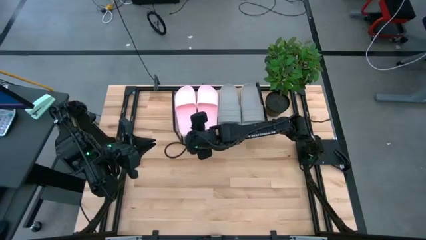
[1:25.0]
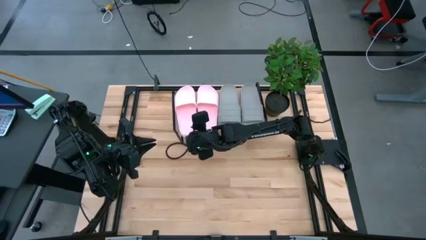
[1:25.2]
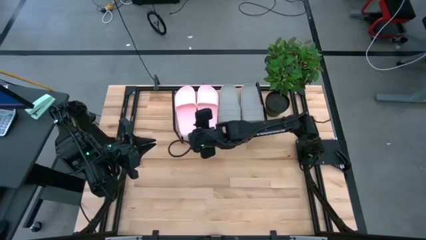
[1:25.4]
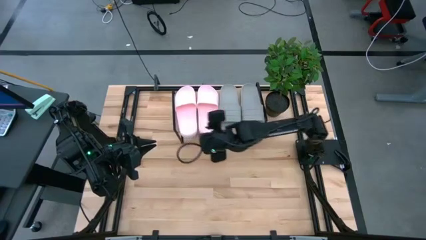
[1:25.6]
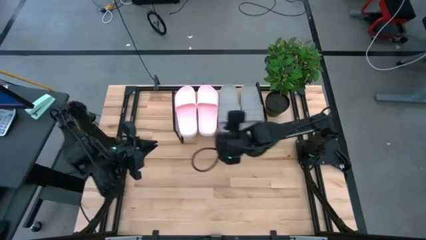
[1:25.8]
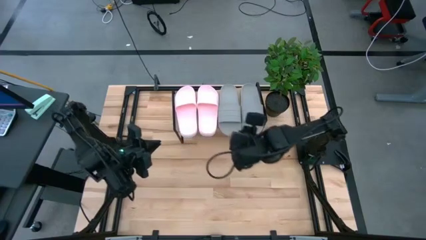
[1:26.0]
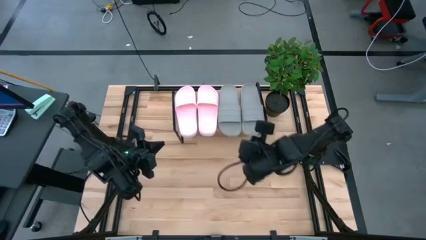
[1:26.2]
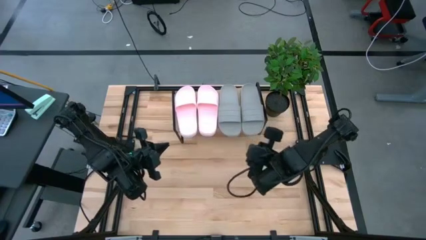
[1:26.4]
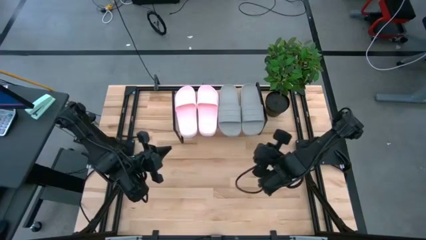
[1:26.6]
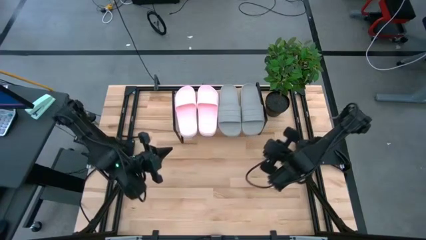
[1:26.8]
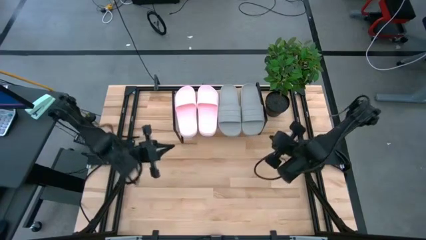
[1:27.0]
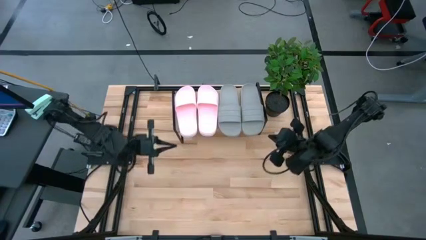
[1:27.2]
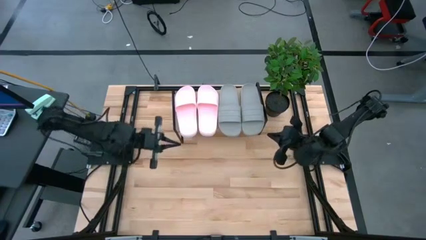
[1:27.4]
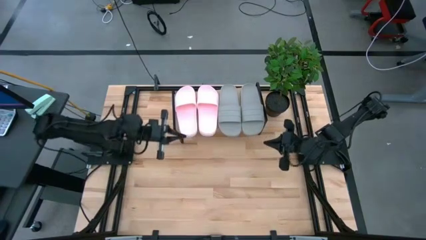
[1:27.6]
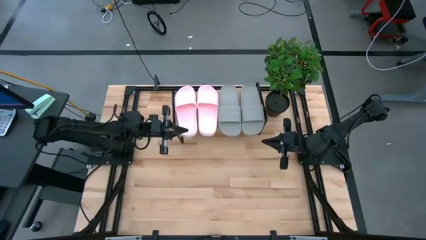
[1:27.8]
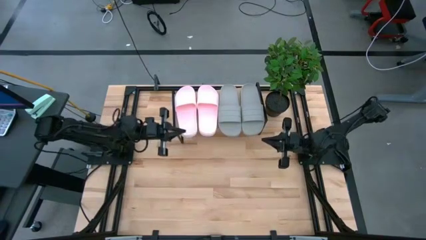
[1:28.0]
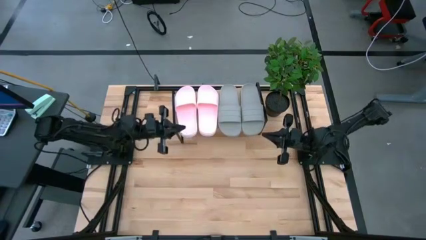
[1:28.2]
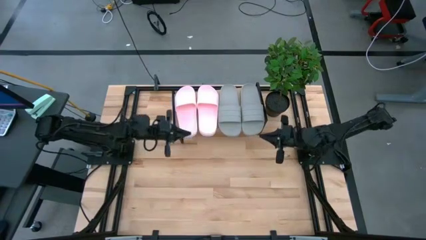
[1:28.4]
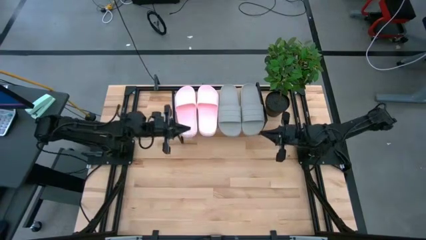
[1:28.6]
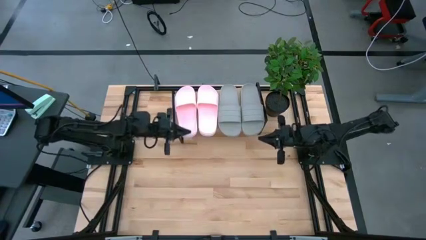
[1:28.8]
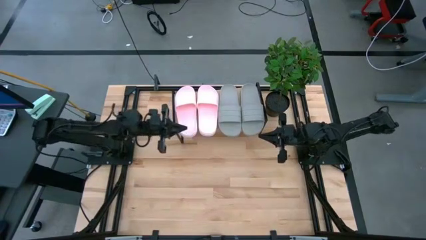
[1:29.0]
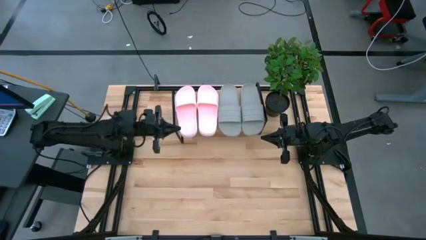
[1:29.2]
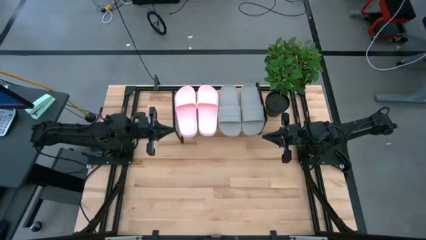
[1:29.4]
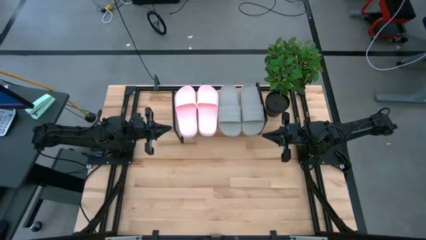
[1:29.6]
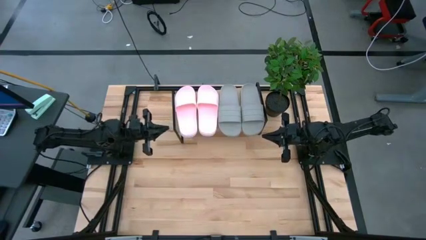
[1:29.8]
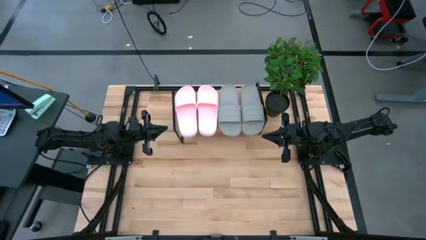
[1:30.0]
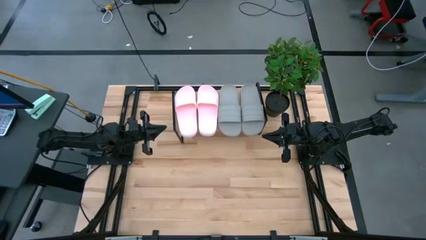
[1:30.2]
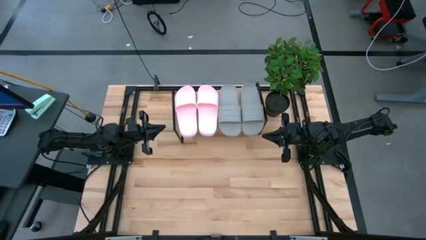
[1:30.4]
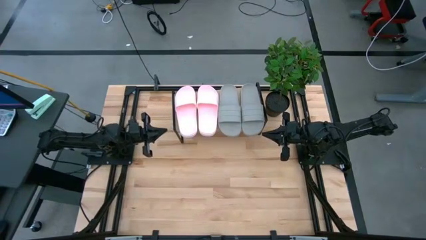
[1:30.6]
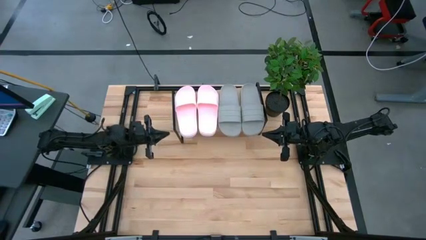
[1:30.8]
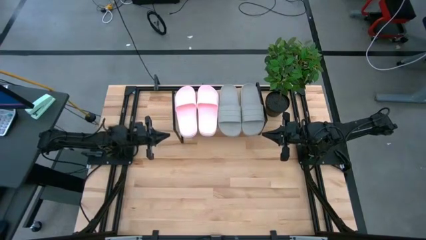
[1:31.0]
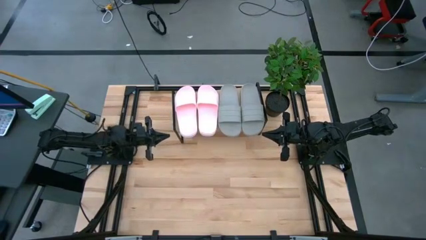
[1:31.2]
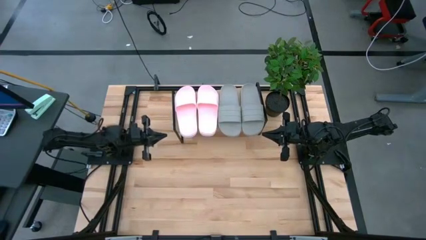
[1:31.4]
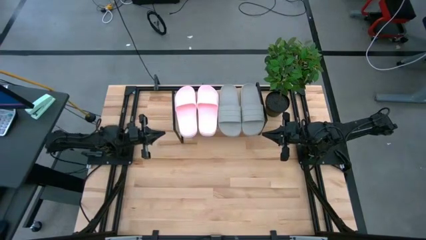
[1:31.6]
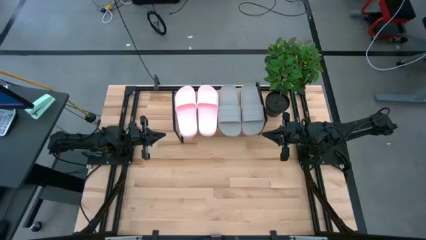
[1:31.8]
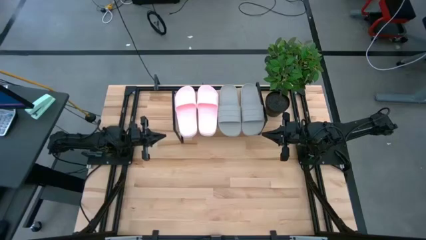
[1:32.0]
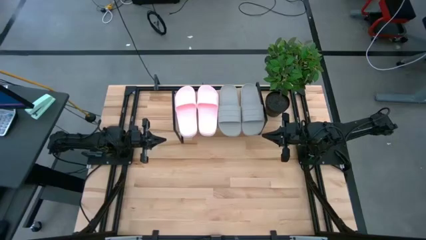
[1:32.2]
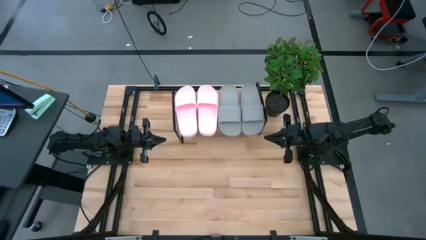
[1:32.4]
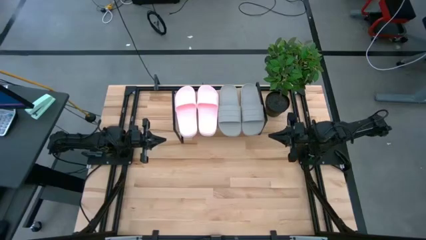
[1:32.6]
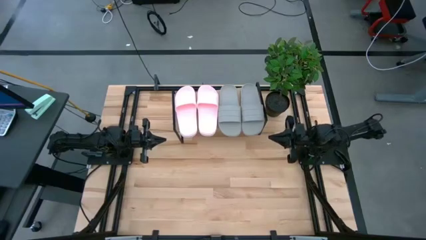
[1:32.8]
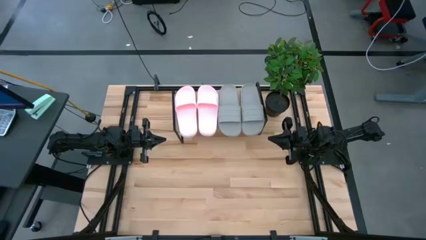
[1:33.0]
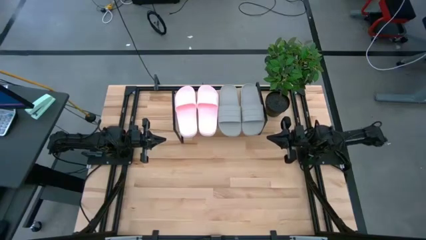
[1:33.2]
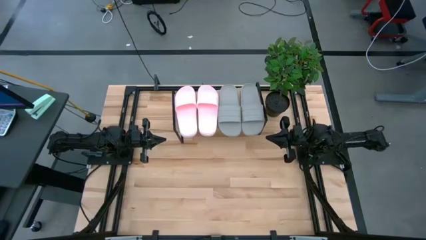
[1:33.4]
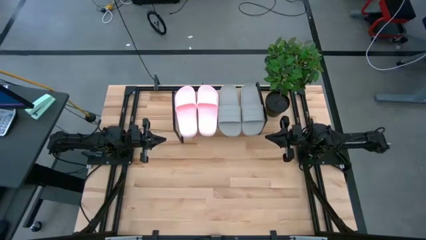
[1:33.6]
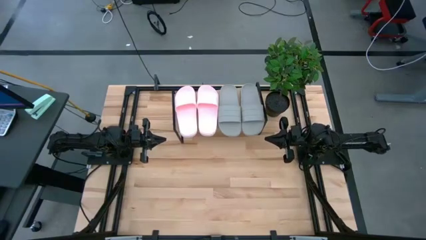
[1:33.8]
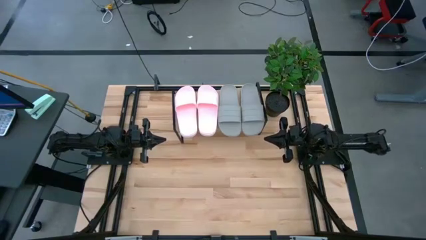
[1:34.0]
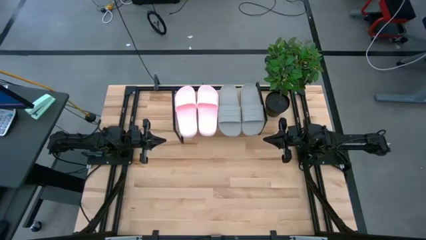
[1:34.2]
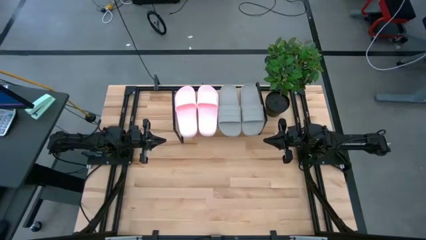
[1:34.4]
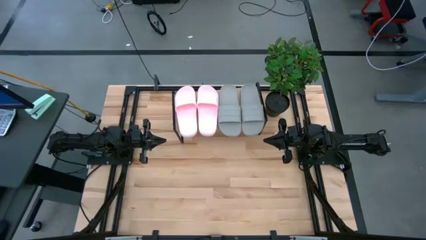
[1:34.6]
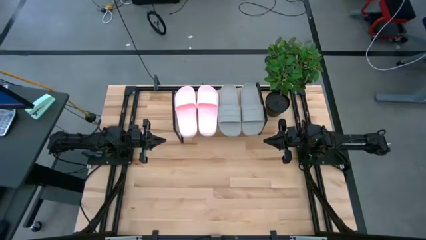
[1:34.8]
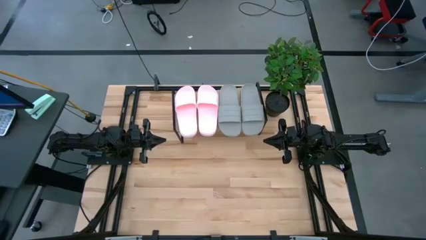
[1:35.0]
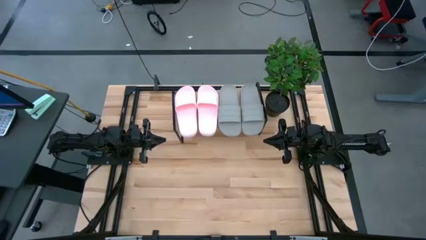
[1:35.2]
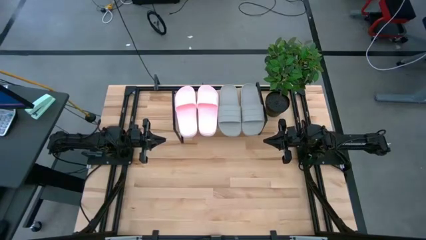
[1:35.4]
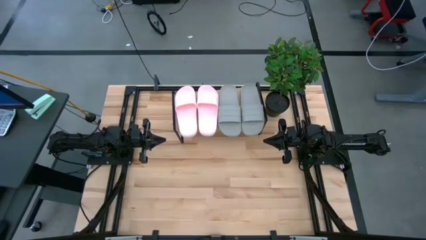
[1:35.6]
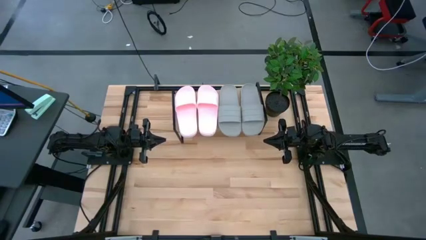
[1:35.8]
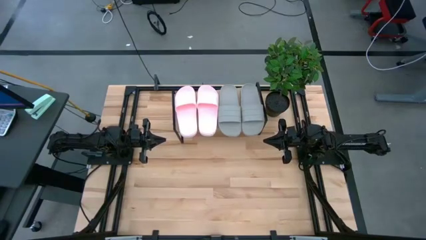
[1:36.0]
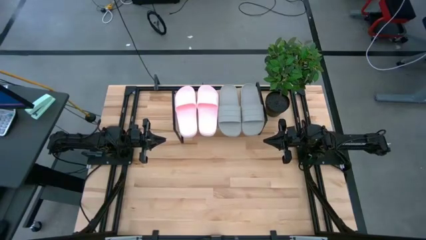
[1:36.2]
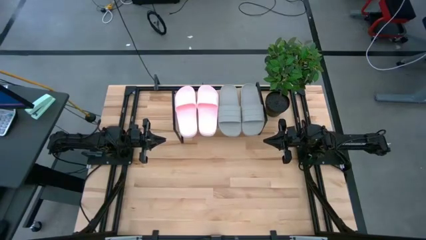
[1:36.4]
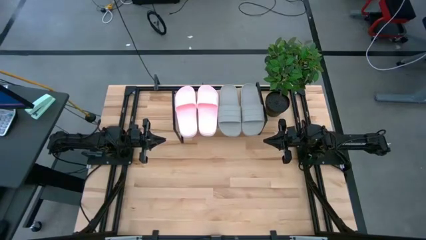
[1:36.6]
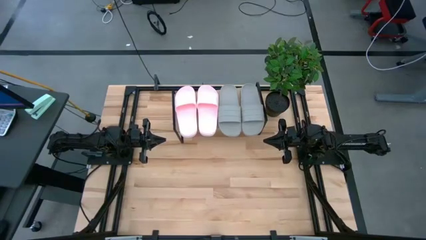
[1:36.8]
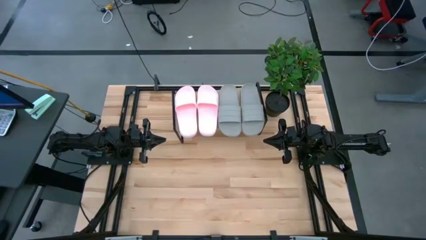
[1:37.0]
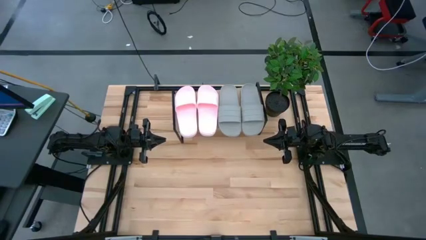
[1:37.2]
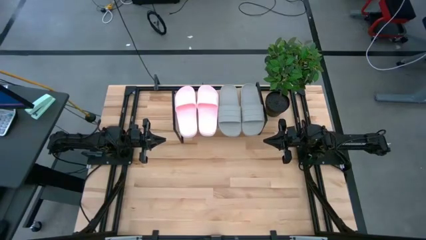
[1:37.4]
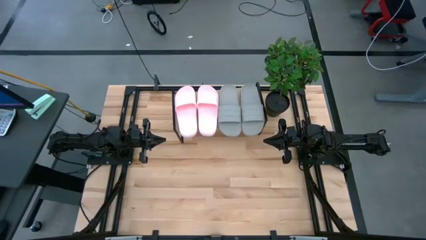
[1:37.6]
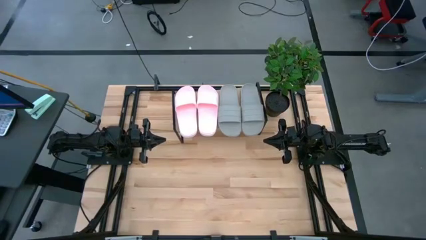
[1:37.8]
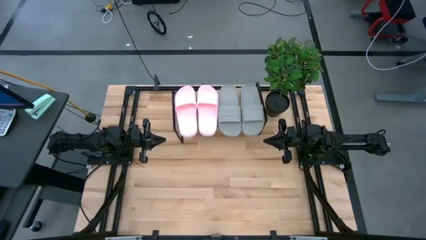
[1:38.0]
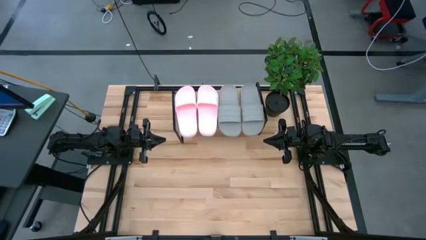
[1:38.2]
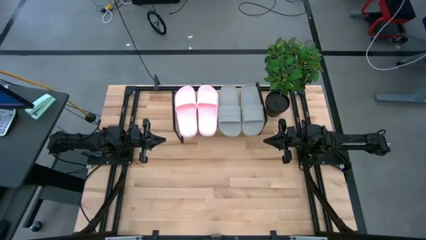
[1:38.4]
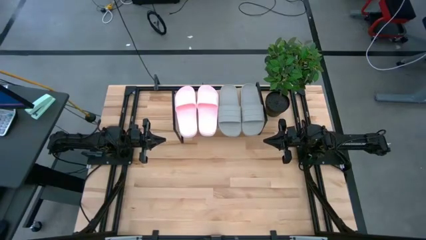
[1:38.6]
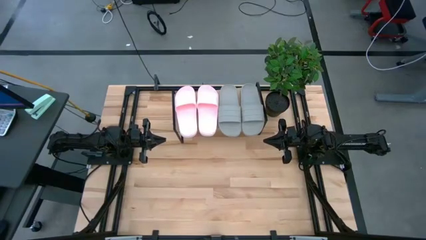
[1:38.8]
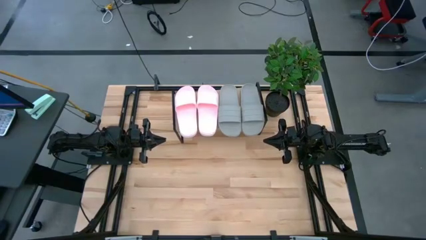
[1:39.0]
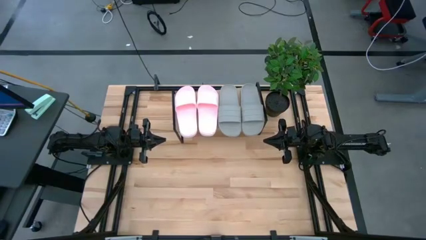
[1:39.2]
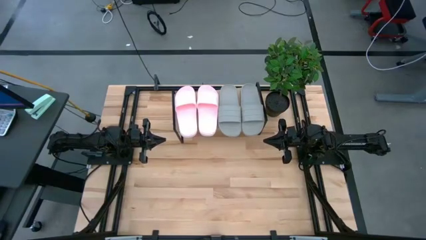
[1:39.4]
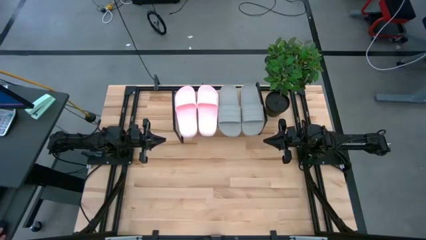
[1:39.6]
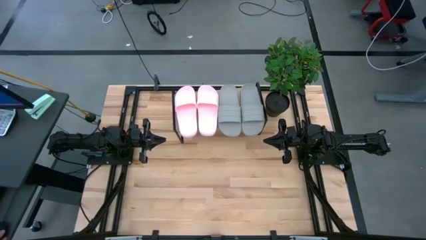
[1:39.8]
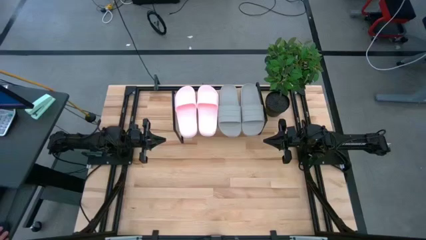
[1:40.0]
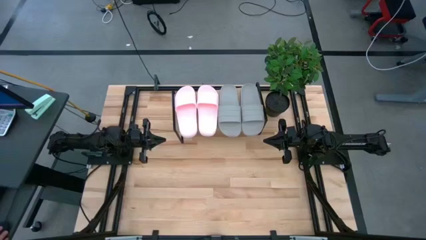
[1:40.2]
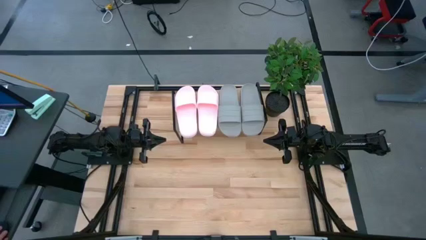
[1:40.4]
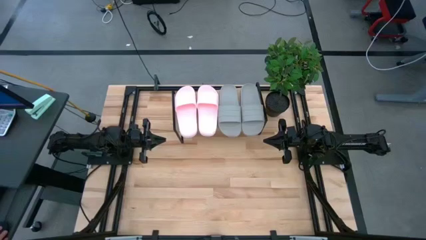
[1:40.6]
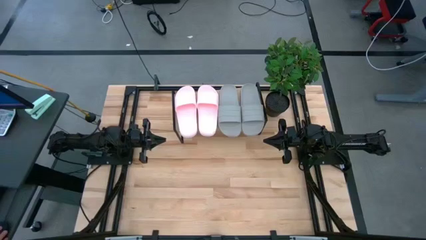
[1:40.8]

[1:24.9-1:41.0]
Task: Pick and place slides into the shelf
Return to Home Position
